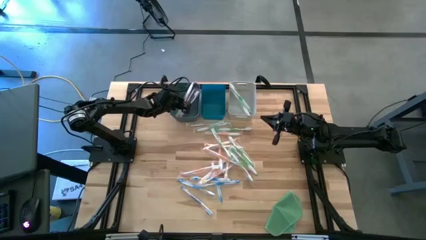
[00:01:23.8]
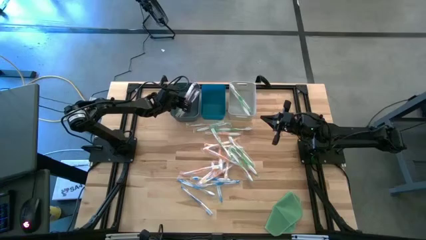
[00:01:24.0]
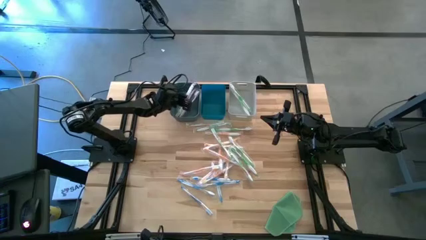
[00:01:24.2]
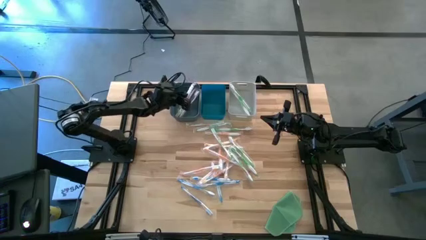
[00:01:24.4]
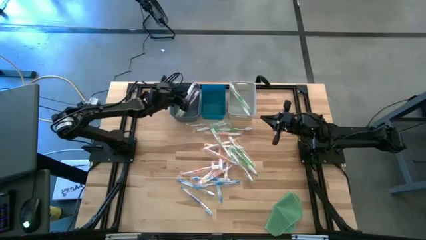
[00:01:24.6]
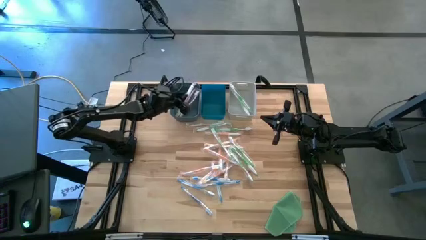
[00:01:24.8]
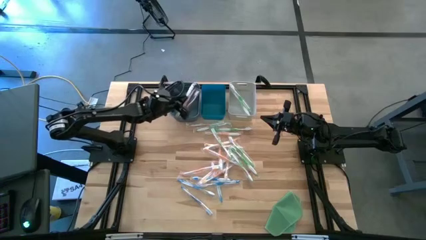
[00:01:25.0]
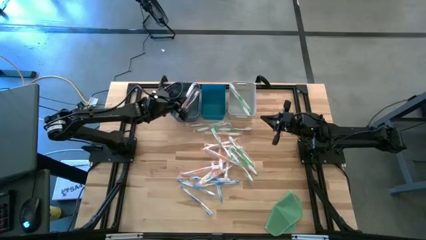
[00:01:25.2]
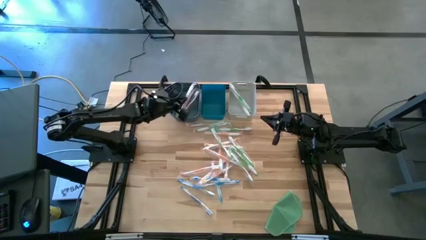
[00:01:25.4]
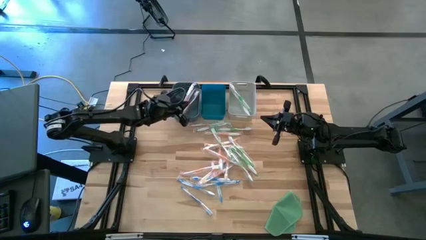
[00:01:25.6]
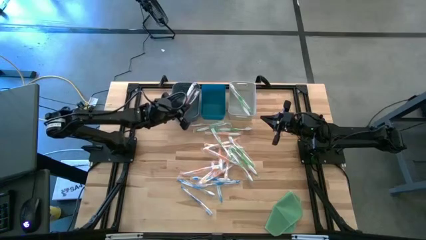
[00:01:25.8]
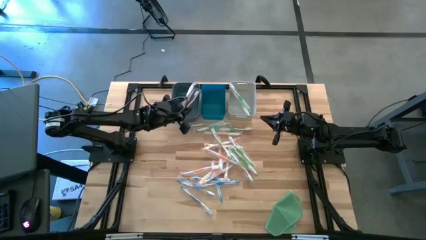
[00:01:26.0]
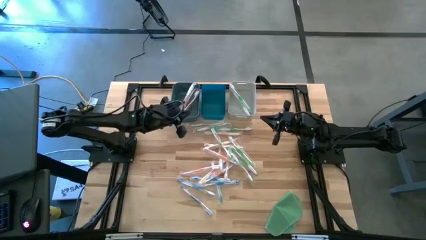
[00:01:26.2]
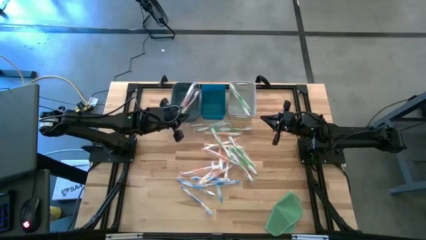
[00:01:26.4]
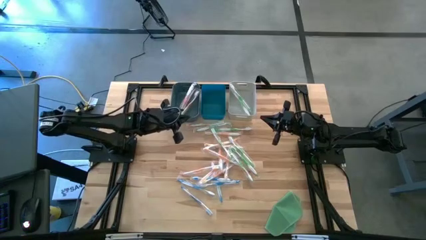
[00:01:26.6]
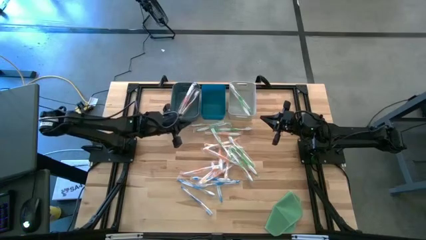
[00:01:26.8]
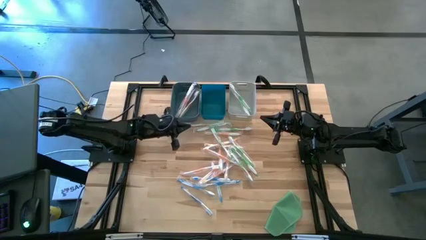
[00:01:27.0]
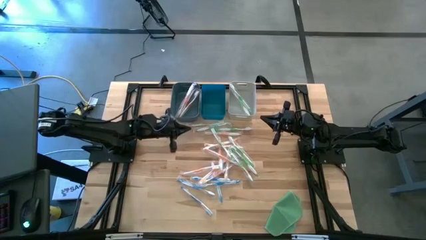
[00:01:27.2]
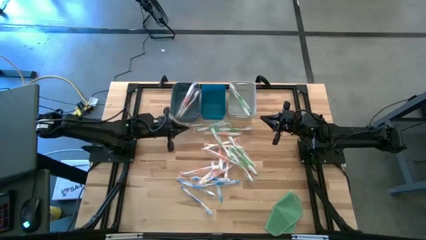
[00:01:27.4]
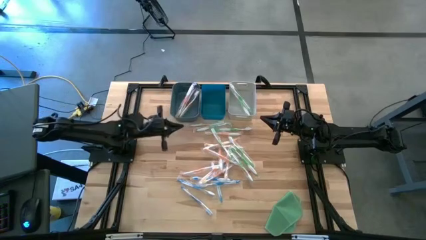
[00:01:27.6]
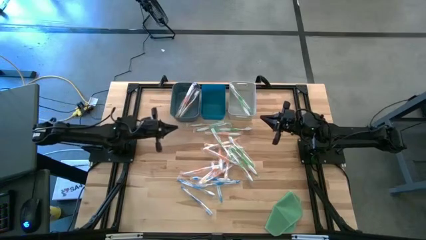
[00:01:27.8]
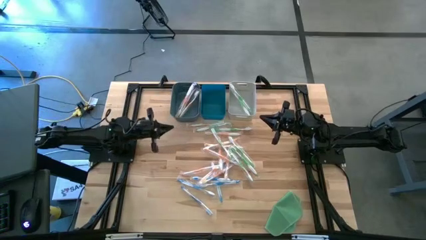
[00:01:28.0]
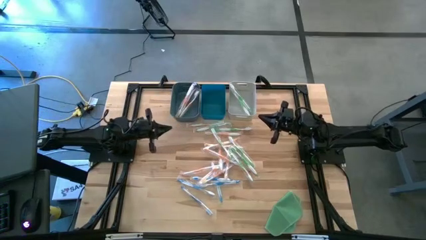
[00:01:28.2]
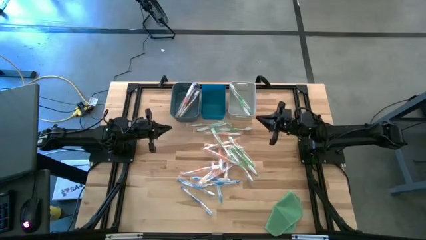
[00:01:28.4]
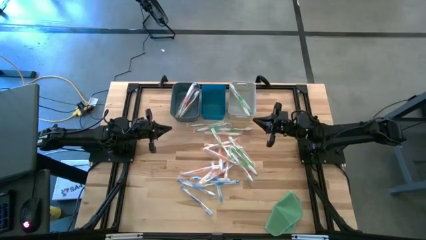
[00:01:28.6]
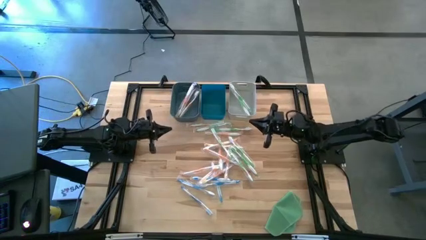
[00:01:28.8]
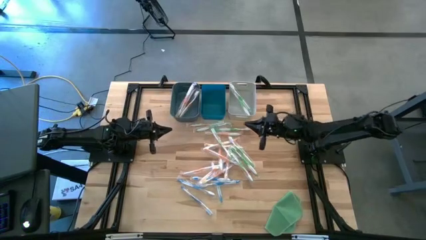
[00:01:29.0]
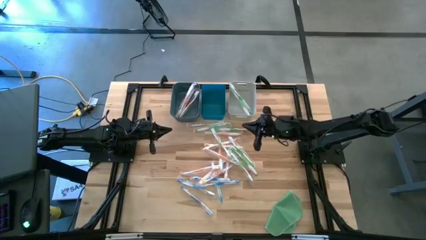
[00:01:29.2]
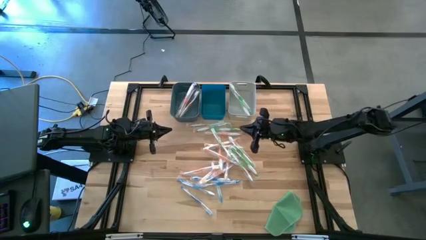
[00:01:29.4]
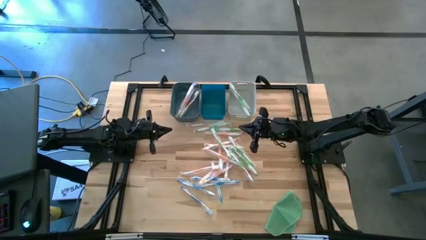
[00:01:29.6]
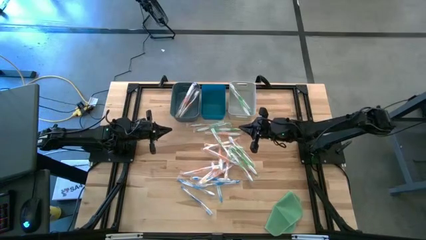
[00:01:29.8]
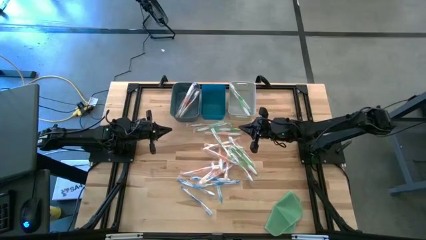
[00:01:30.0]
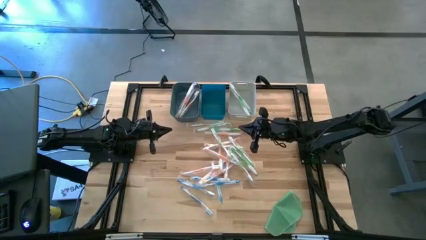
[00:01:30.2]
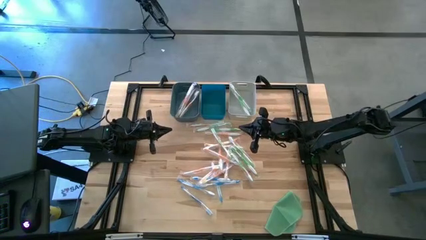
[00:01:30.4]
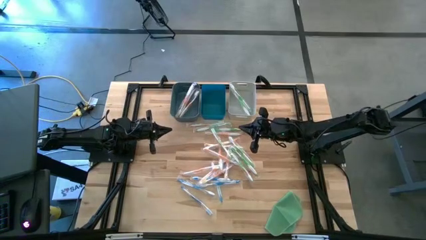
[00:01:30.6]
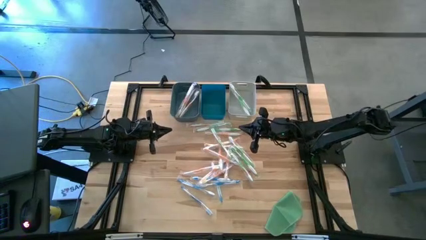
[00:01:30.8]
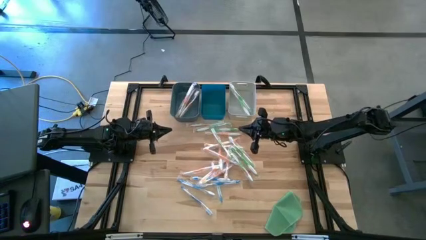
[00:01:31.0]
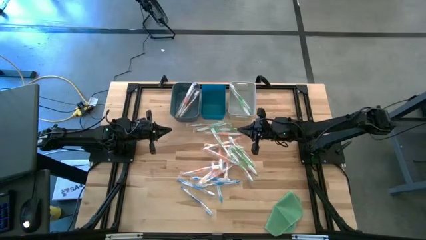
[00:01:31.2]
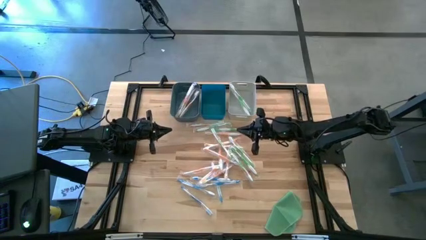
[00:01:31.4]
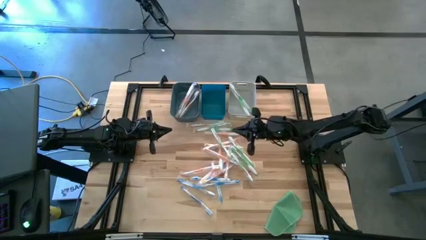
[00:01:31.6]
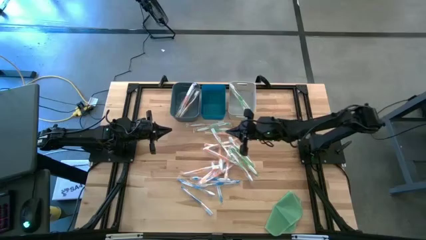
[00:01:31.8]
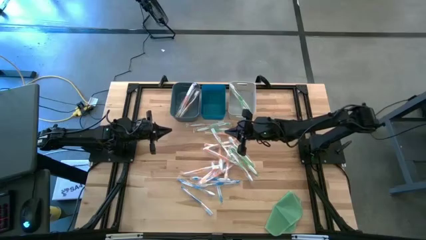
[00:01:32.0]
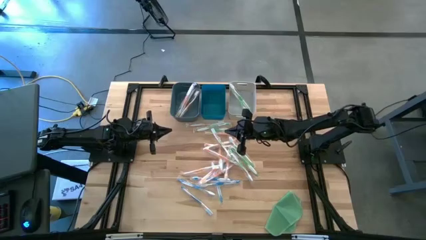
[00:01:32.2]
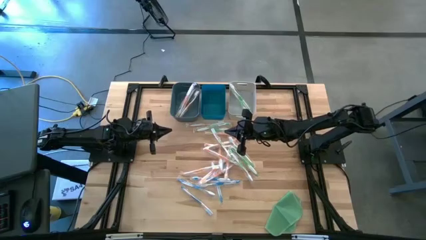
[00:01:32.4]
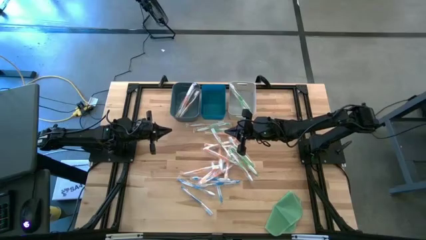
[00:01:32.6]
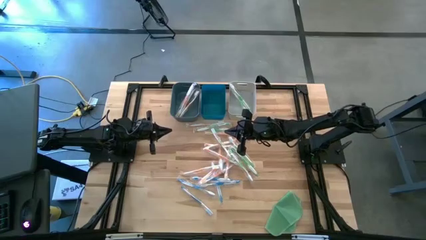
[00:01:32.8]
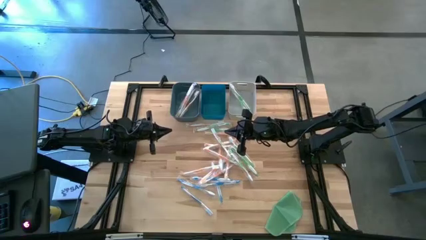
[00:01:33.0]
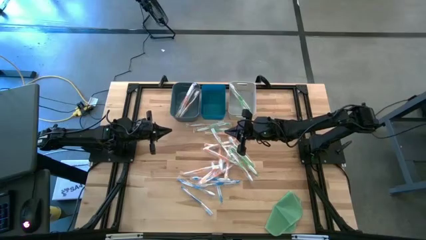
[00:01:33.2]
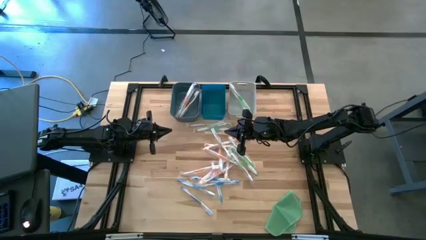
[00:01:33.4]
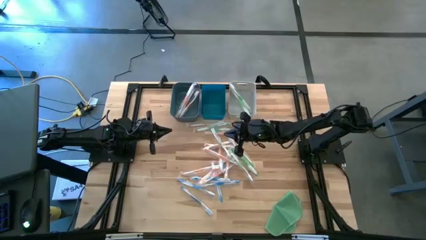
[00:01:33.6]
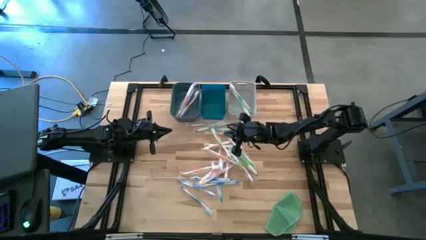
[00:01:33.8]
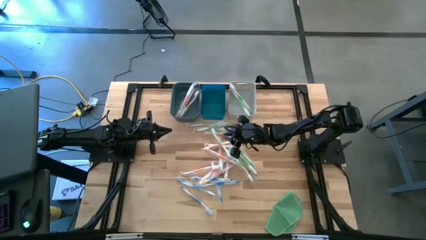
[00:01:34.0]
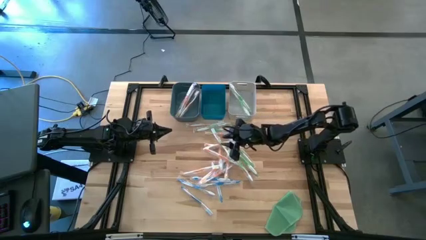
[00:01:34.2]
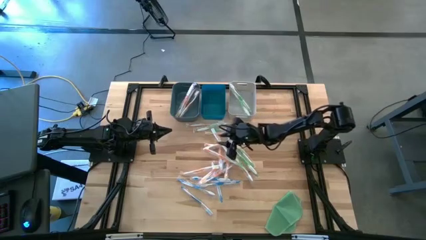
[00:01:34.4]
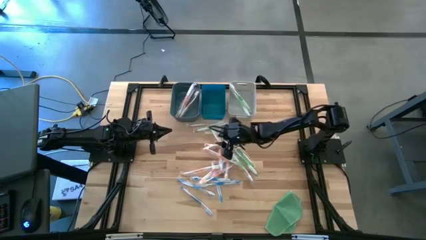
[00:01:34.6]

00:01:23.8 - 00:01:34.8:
Task: Pick & Place Toothbrushes
Put the green toothbrush into the white bin

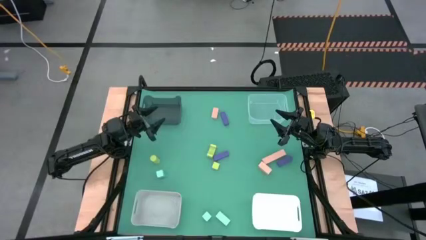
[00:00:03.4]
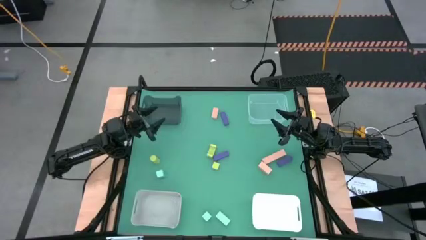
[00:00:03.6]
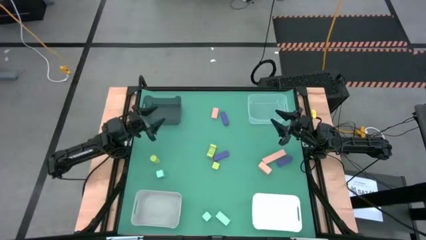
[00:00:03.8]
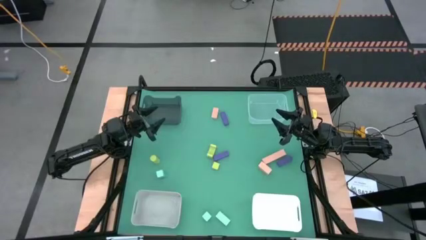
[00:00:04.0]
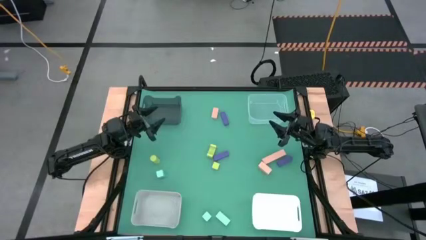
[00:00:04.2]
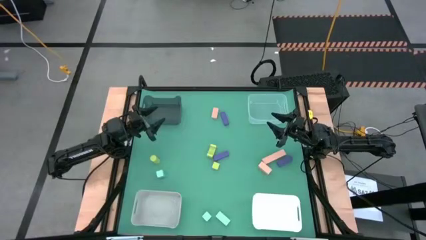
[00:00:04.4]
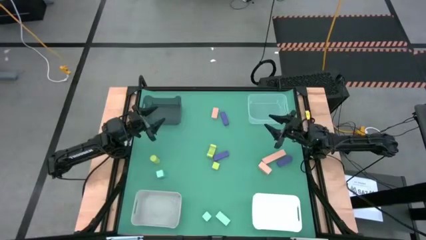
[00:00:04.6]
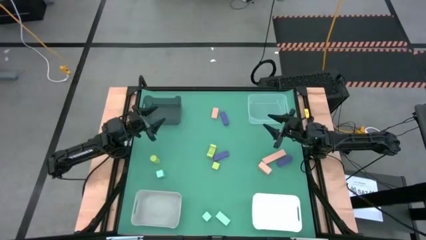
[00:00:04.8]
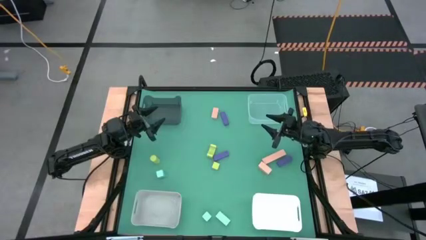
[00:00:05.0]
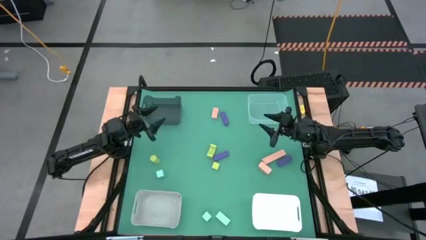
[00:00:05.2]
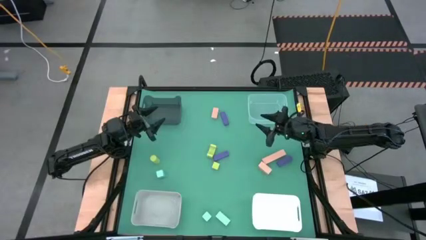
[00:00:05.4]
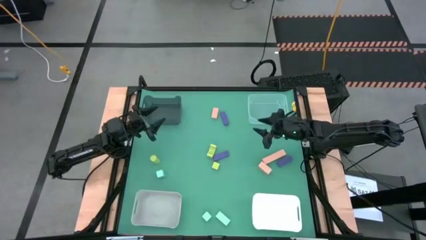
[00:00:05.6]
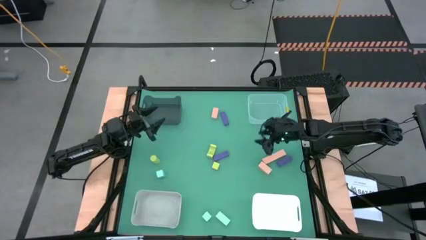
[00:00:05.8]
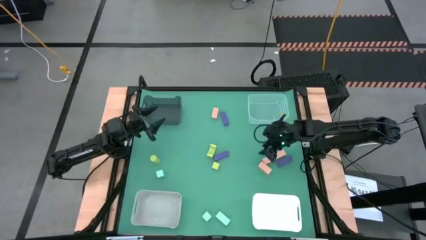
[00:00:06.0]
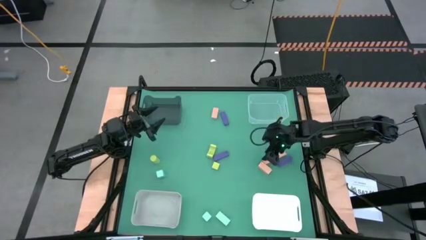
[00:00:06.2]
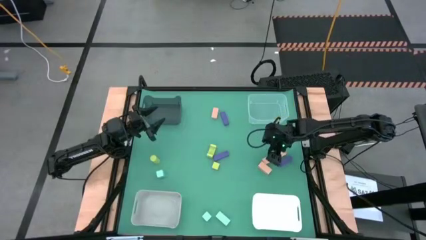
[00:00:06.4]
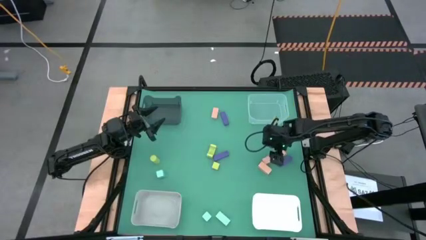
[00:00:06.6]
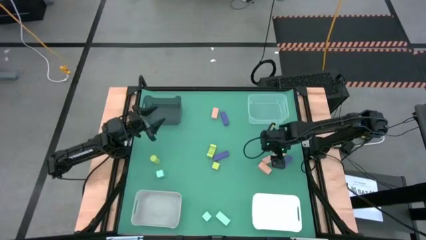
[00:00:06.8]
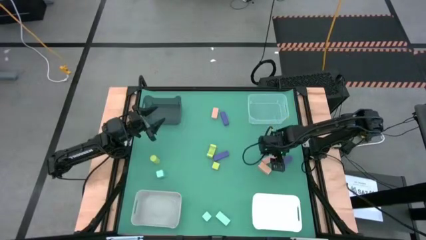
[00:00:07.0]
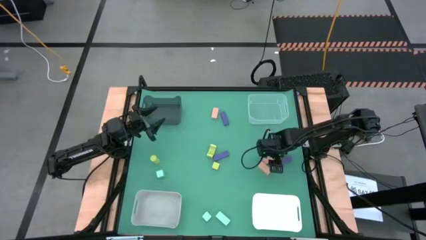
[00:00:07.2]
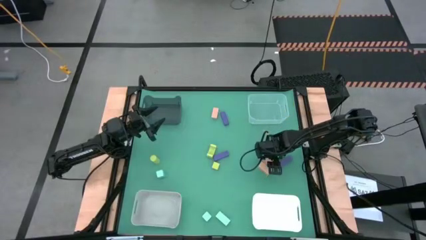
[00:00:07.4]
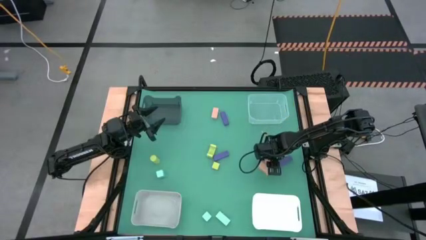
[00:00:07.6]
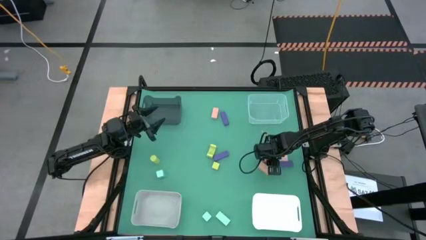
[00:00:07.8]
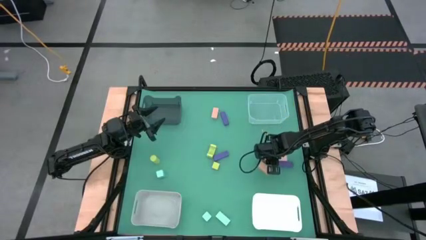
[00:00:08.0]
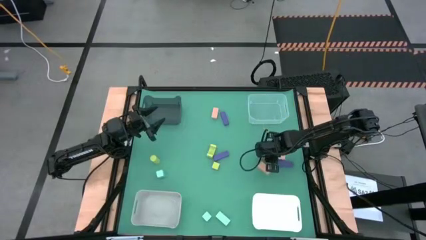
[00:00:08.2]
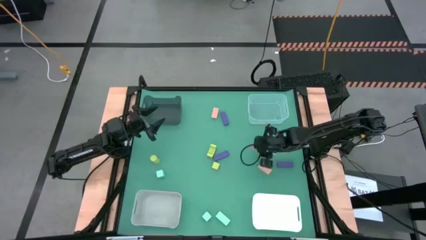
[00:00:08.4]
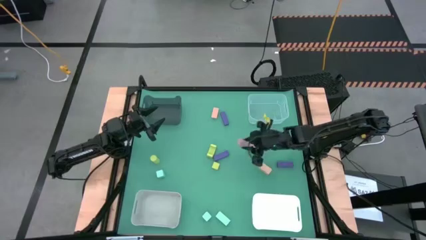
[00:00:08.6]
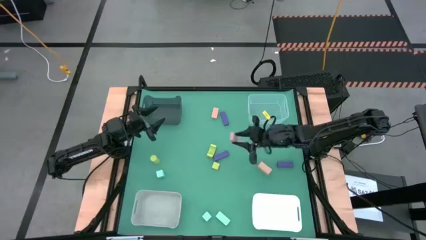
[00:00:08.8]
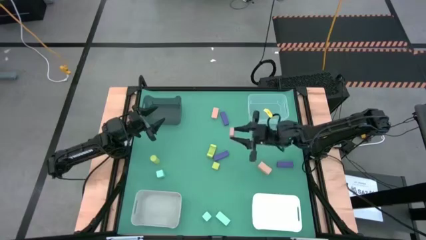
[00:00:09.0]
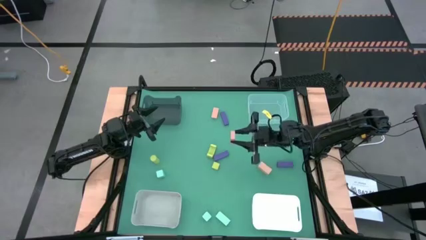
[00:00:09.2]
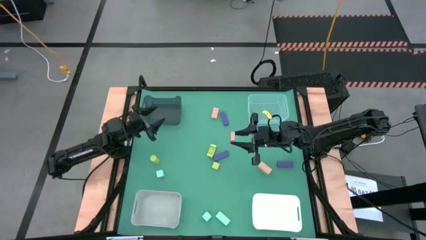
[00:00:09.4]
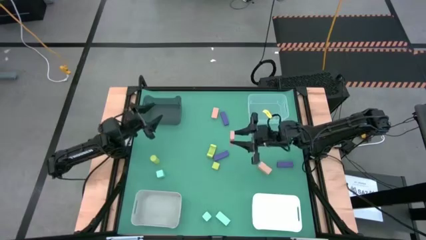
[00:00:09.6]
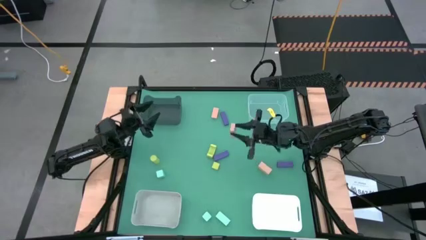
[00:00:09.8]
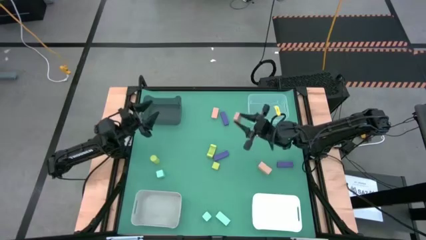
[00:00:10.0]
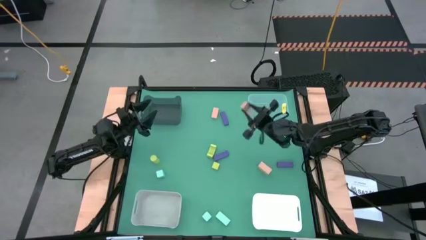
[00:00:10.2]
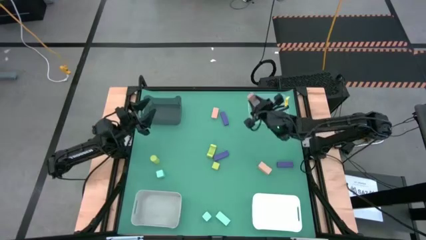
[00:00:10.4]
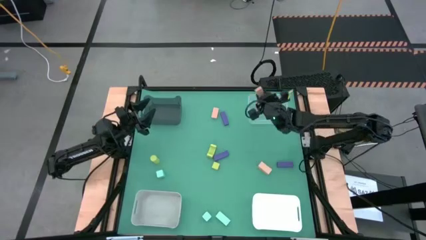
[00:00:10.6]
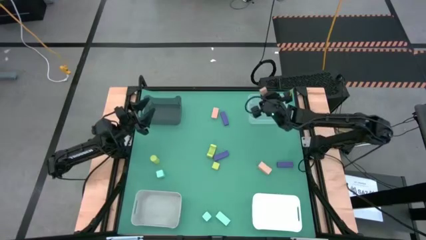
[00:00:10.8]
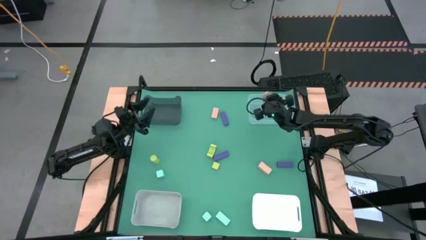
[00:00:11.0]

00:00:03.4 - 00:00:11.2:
Task: Sort & place blocks by color
Put the middle peach orange block into the transparent bin
